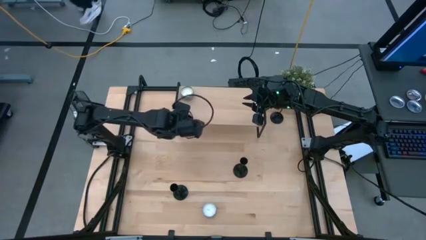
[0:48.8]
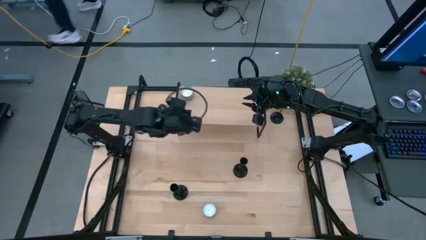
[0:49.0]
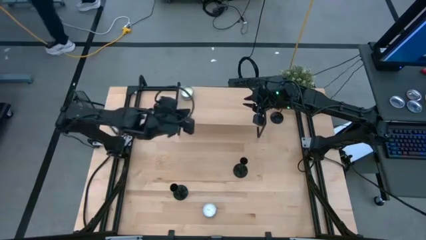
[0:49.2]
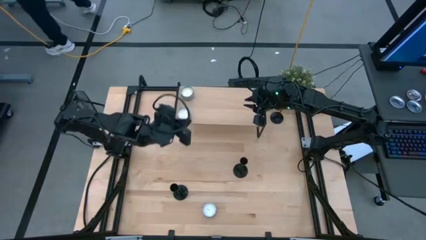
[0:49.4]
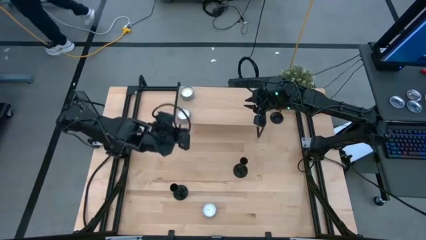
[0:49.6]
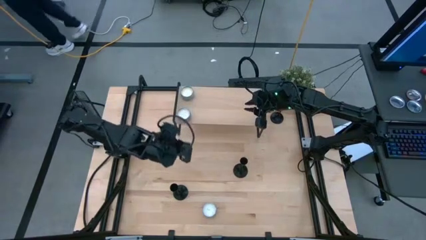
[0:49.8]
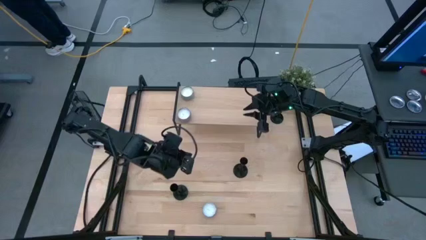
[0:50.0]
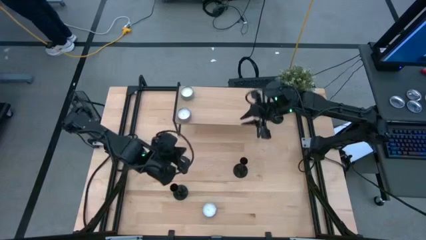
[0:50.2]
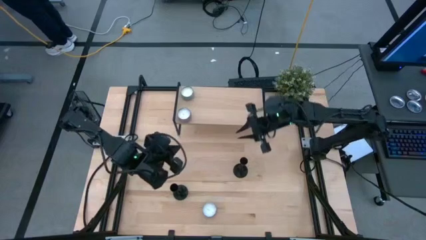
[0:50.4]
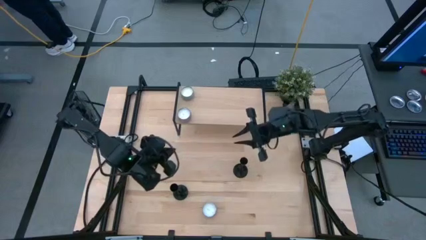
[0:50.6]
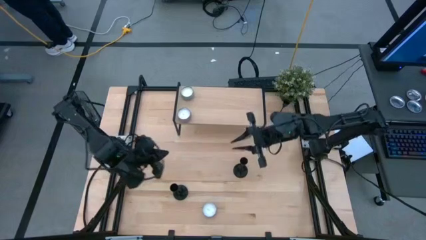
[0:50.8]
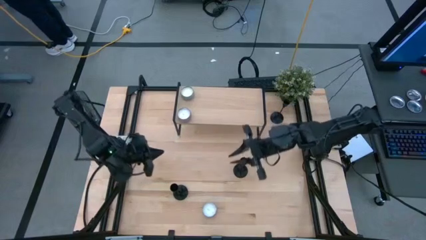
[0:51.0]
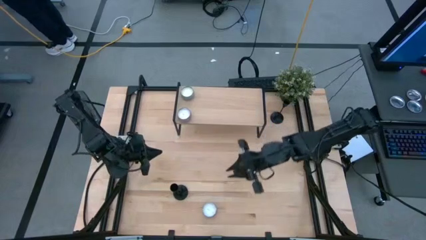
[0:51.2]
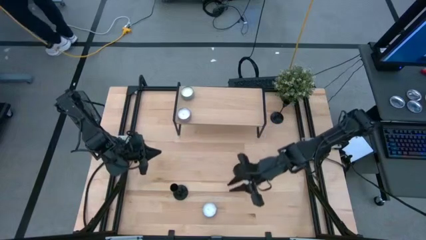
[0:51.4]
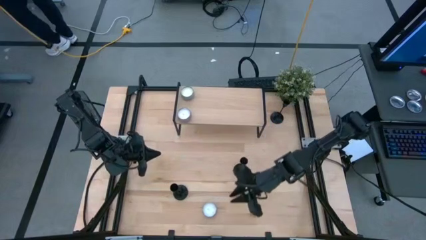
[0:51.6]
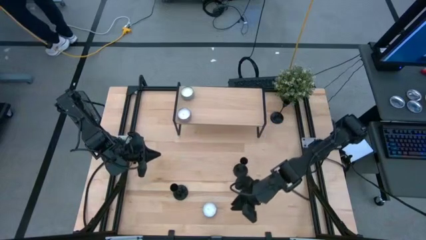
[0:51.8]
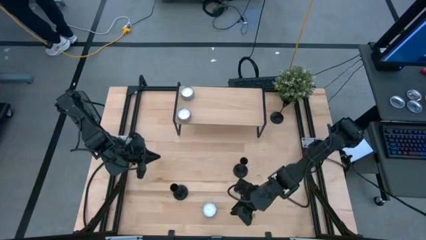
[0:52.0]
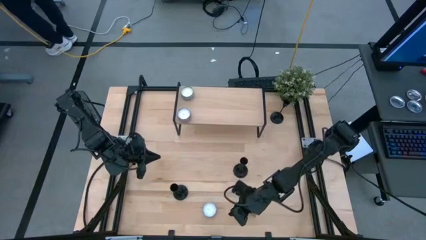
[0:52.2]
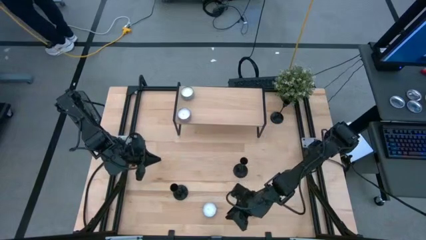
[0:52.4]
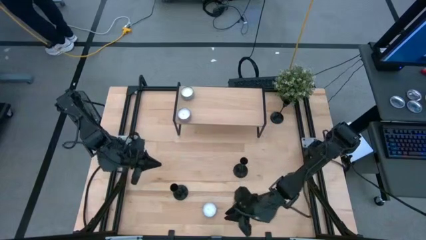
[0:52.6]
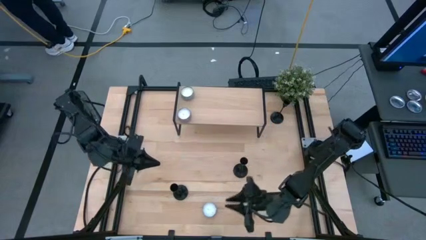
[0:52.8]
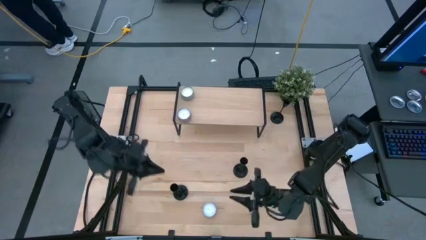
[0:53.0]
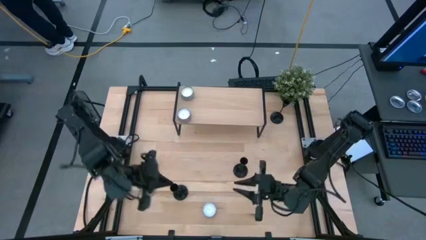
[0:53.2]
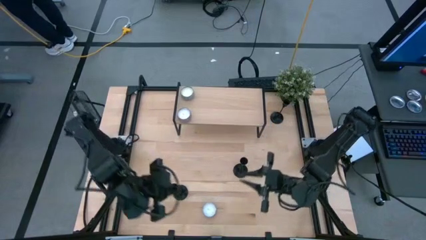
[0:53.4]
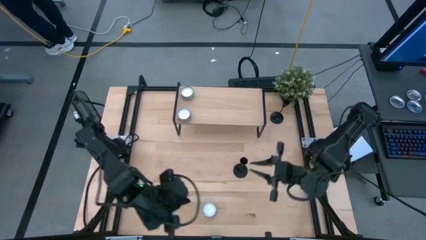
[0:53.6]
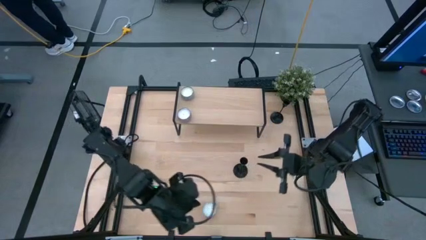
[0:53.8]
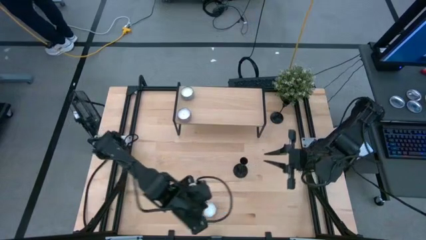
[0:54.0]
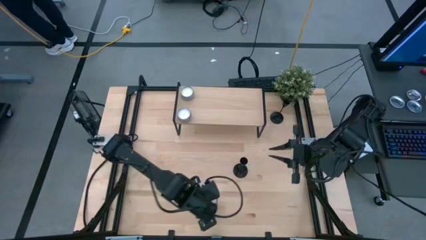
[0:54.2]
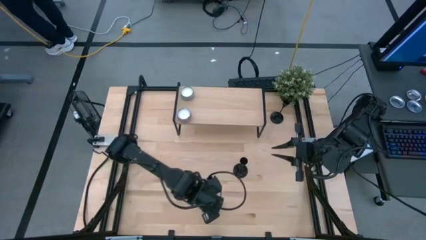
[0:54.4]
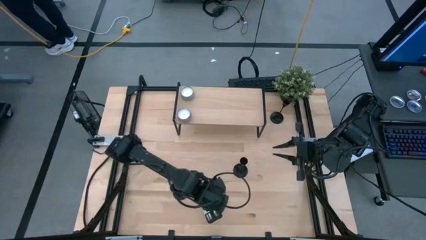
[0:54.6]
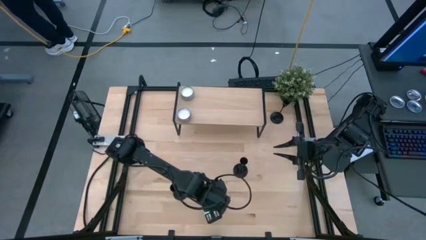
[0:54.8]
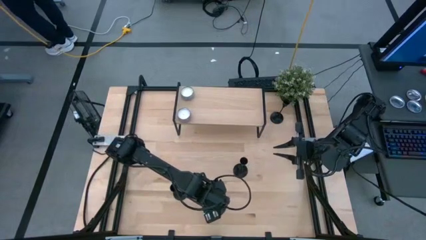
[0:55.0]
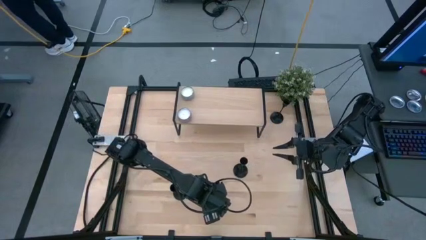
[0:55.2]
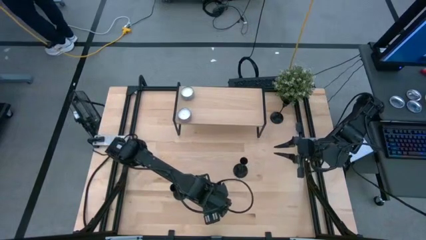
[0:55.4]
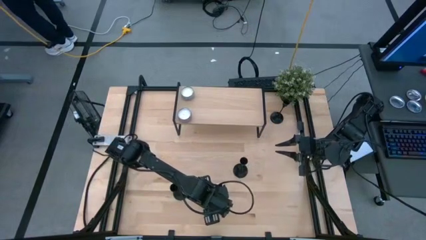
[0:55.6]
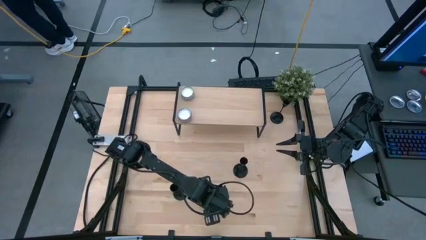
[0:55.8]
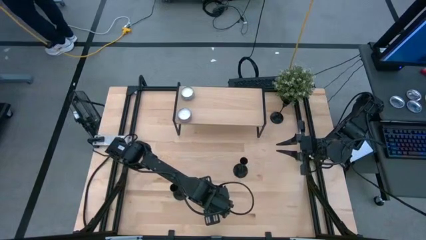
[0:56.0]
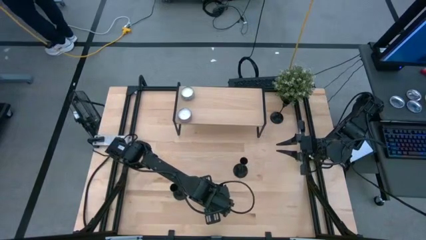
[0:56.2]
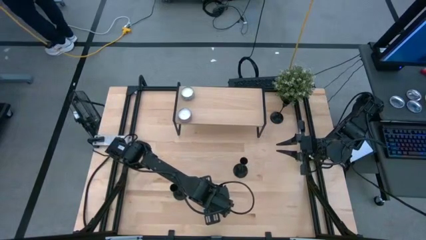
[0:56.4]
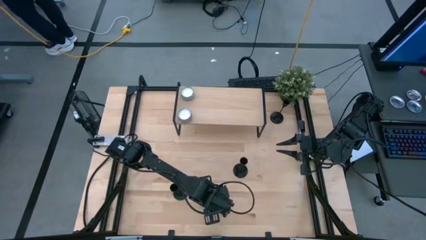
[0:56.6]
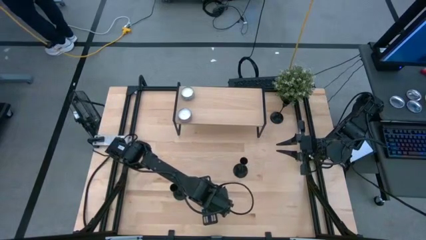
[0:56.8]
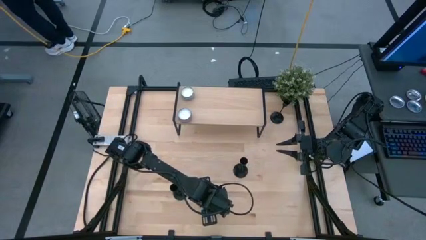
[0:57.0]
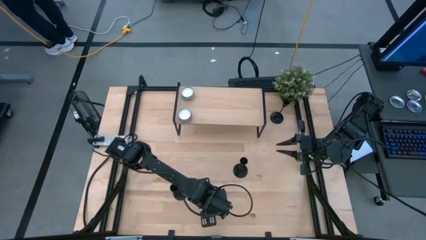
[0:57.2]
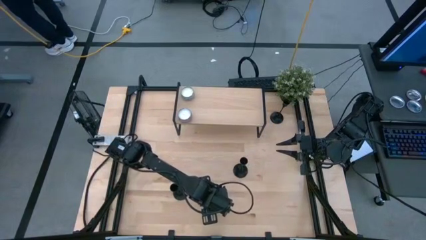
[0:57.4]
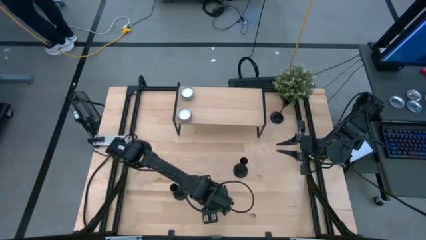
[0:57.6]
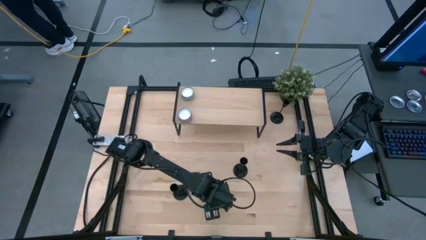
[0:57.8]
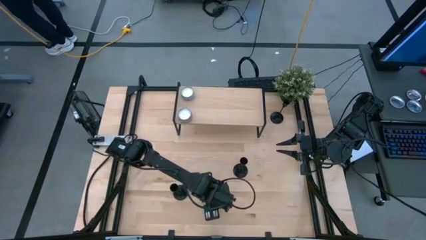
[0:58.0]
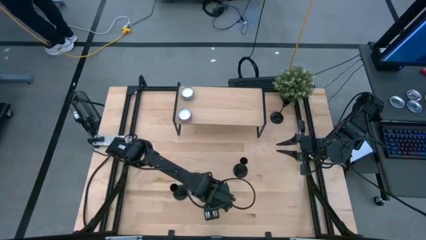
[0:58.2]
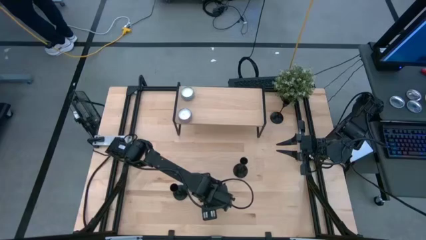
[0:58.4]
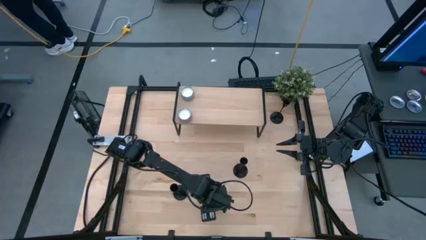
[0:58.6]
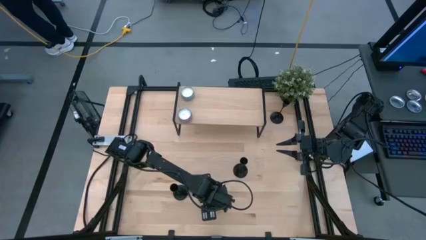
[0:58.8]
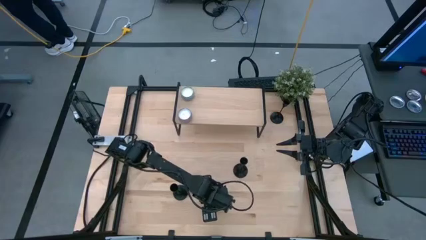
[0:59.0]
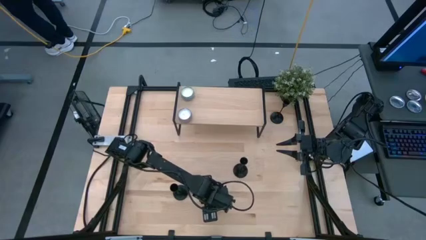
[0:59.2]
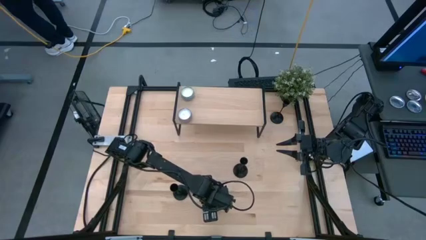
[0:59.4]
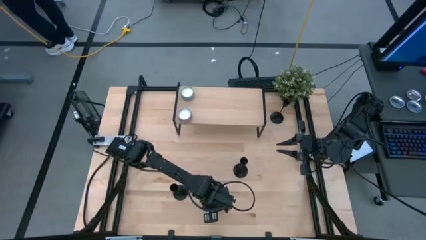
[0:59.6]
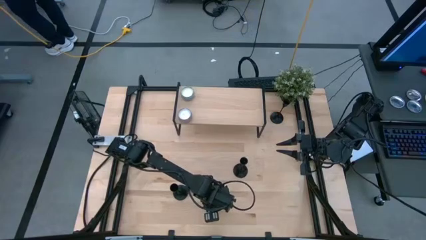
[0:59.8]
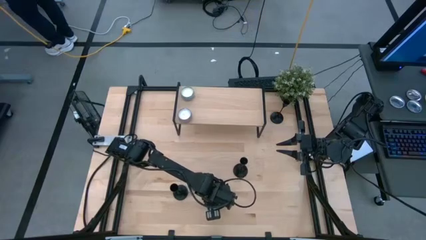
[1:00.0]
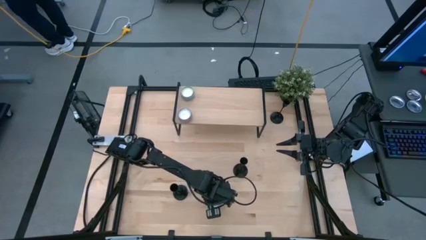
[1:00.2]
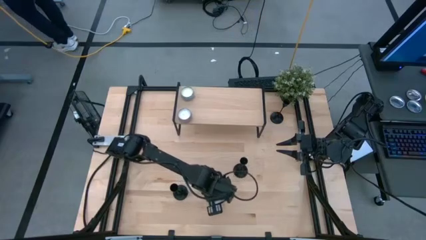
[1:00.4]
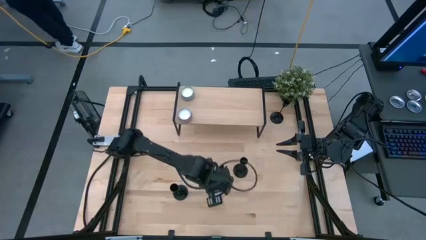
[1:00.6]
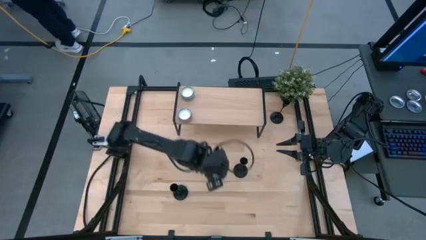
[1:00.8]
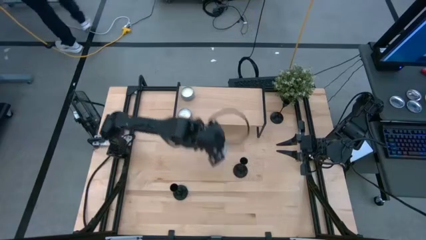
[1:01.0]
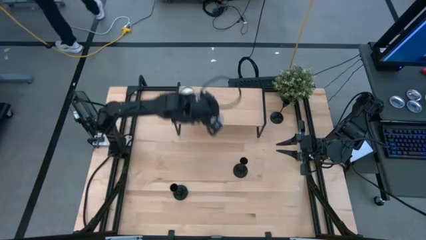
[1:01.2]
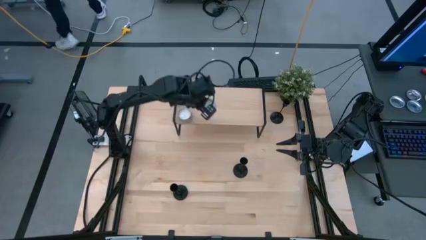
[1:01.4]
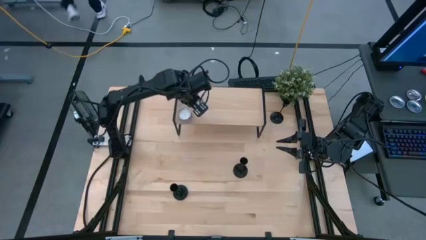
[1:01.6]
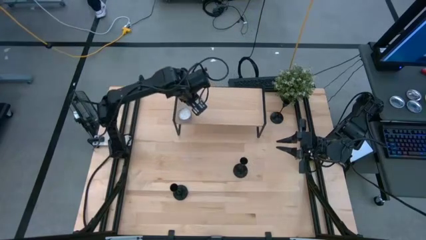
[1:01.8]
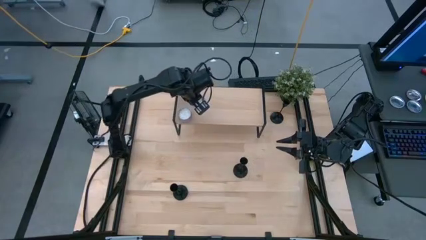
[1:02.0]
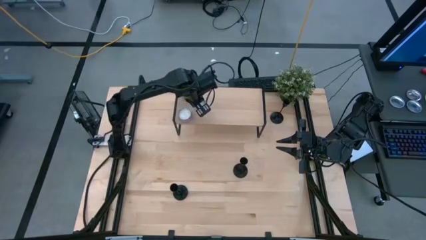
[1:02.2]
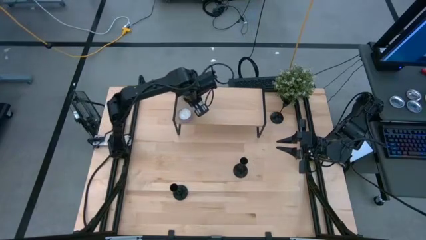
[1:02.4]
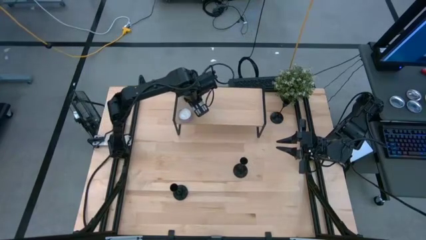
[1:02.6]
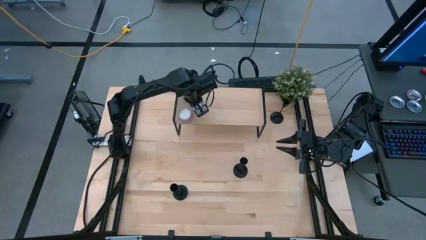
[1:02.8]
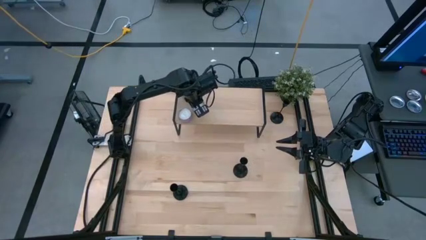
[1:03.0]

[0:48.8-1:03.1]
Task: Pick & Place candle stick holders
Put the red scented candle on the shelf

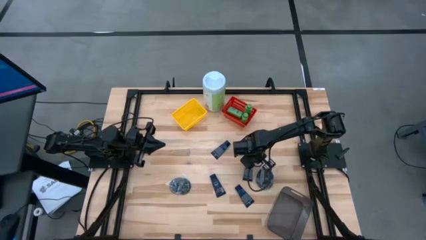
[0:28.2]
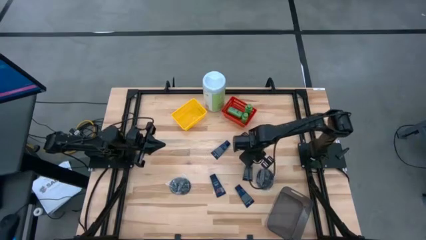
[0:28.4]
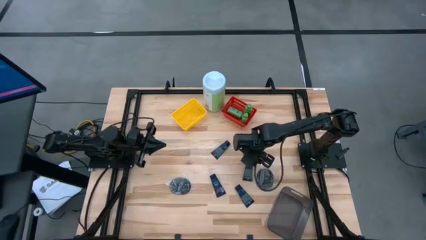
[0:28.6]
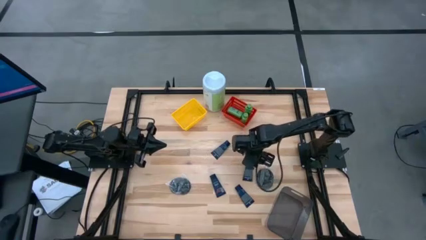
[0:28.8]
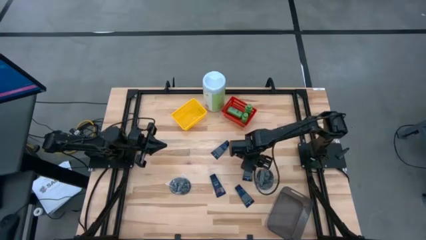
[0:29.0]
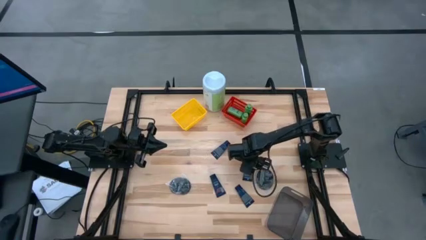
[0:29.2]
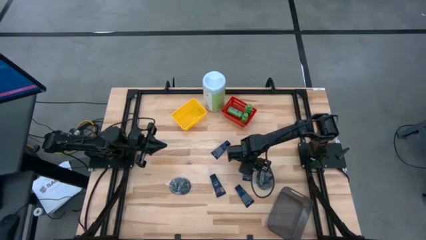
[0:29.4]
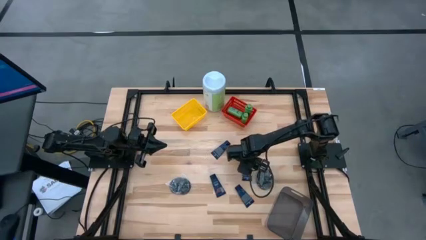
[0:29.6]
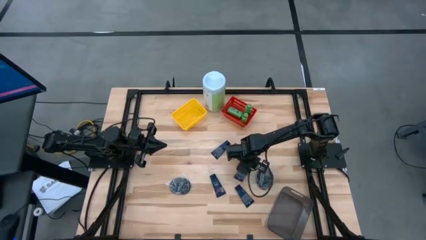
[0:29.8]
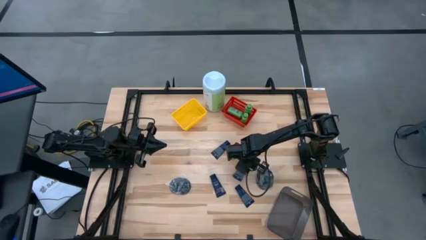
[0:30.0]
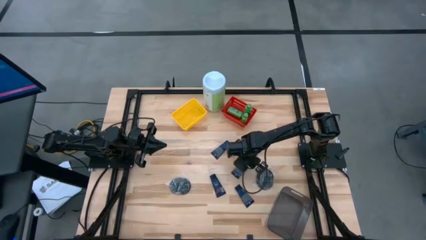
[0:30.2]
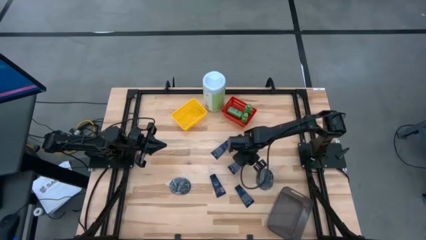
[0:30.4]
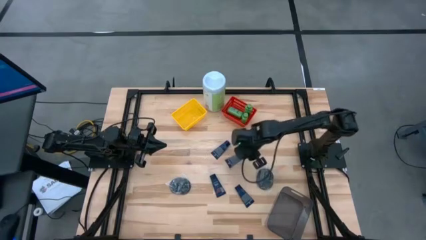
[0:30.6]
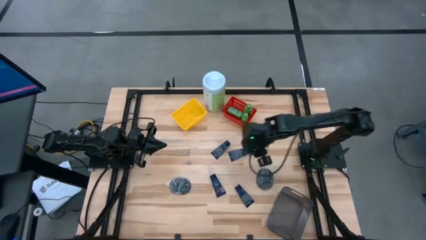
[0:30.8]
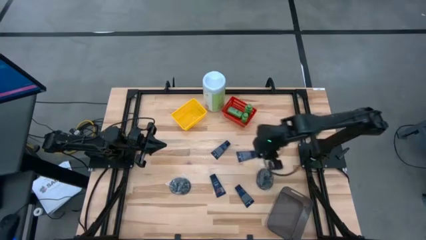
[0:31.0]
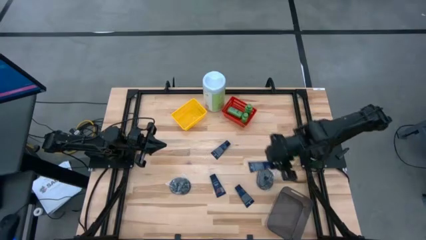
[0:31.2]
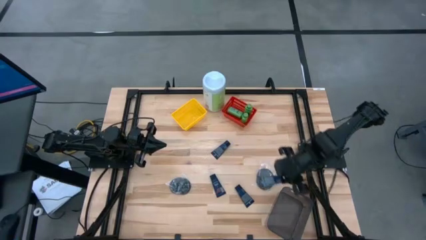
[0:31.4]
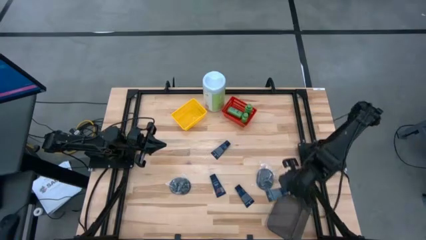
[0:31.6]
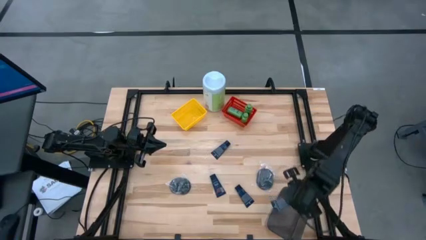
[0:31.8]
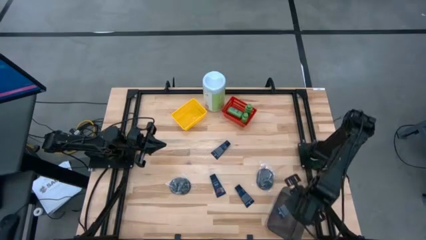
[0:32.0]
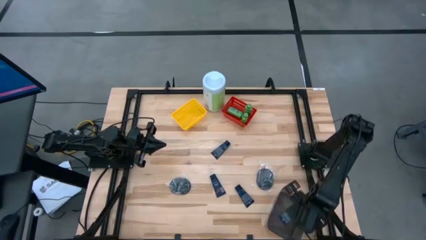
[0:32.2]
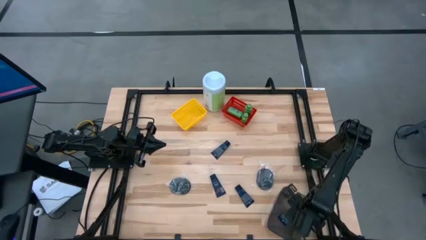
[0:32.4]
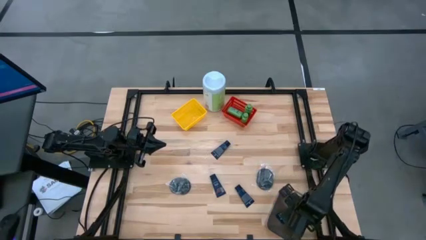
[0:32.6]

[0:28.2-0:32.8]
Task: Pick & Place Travel size toiletries
Put the dark blue shave cream in the black bin
